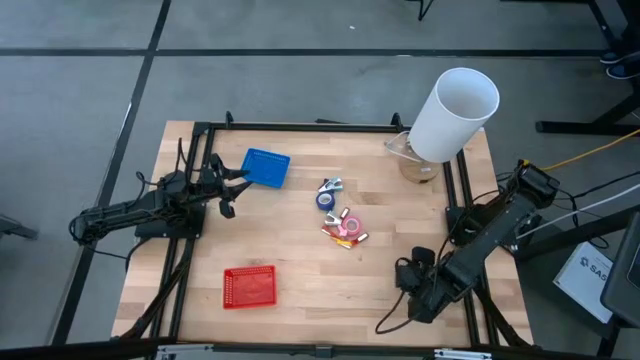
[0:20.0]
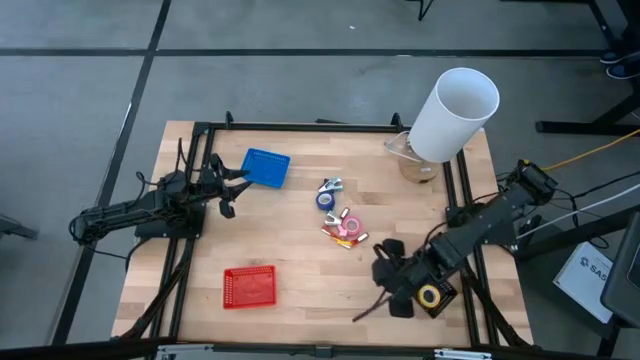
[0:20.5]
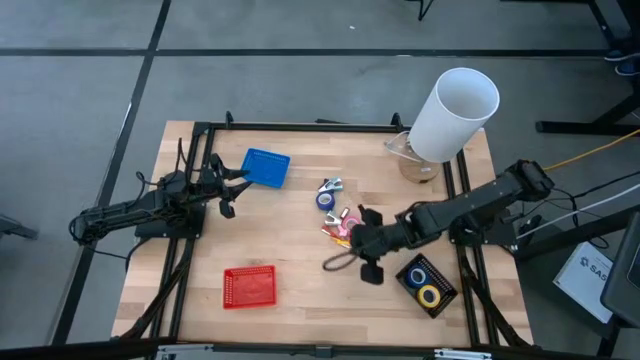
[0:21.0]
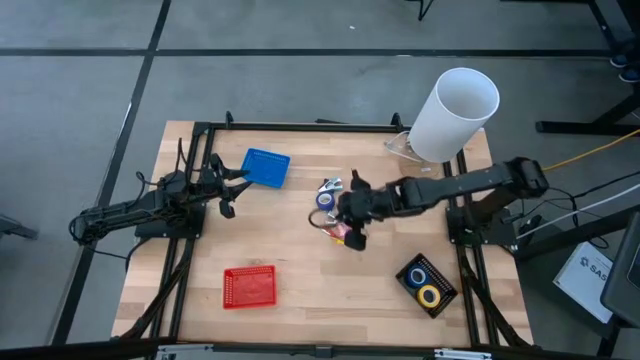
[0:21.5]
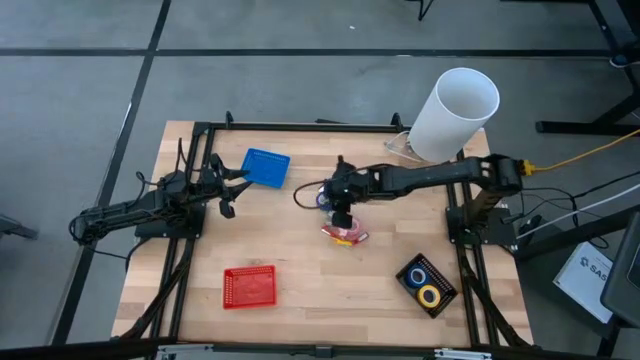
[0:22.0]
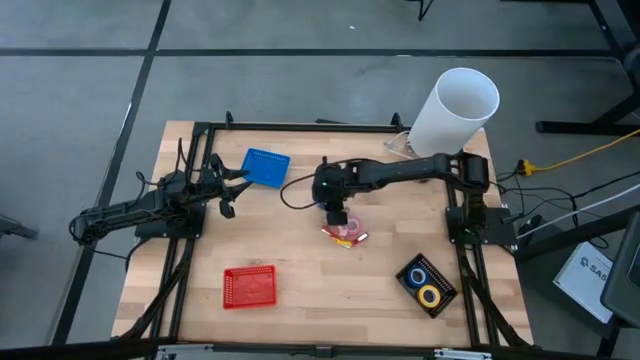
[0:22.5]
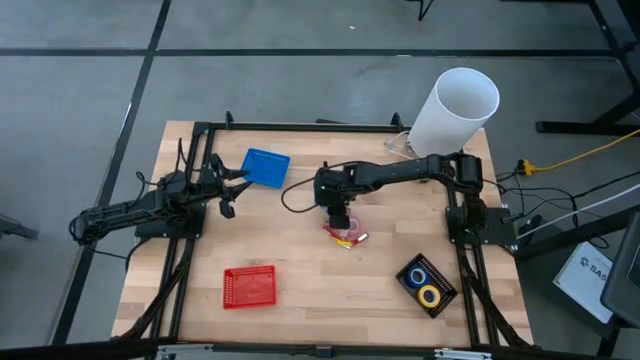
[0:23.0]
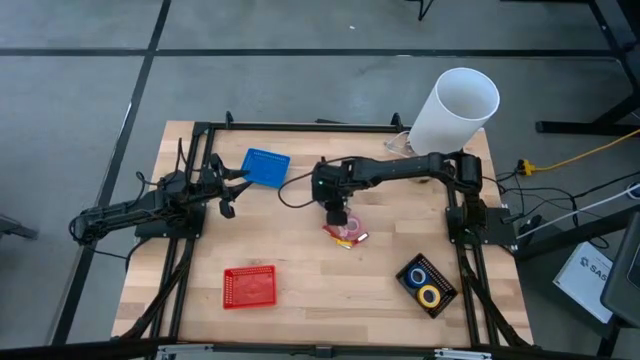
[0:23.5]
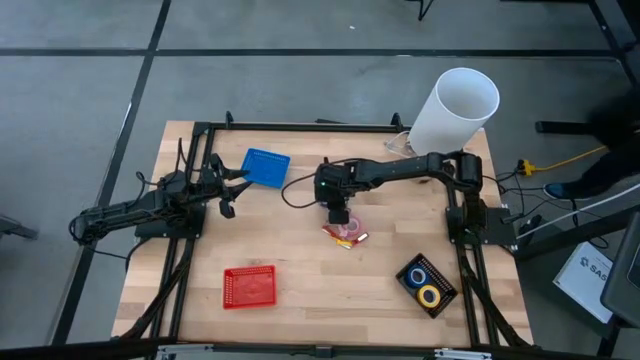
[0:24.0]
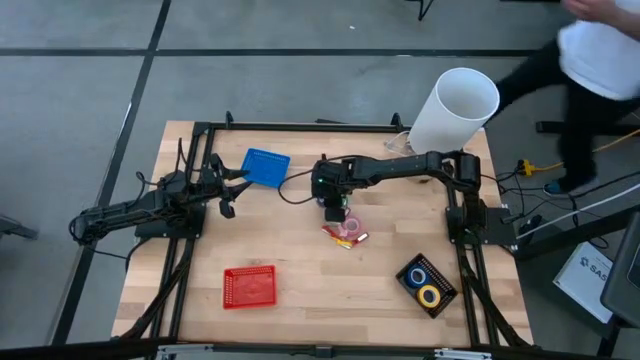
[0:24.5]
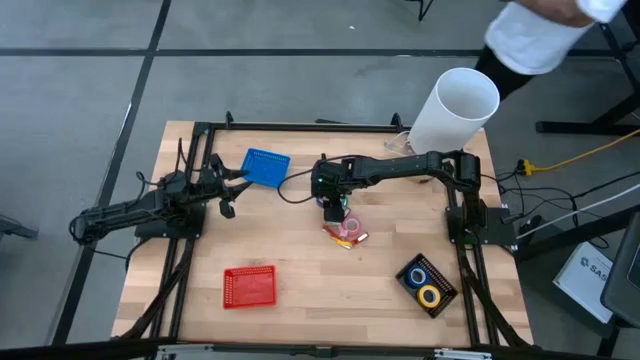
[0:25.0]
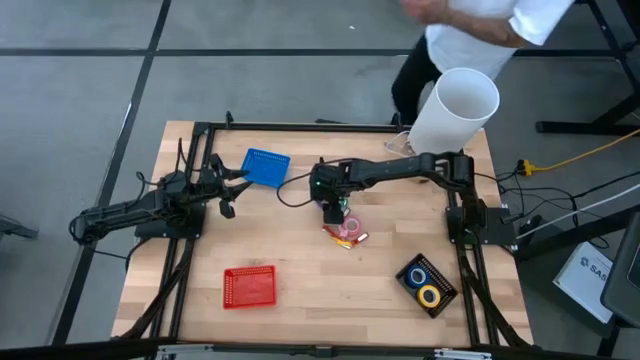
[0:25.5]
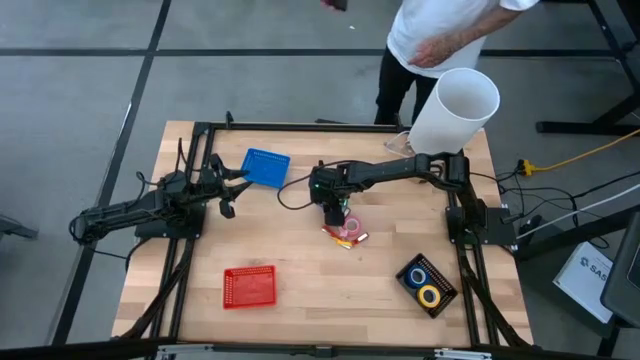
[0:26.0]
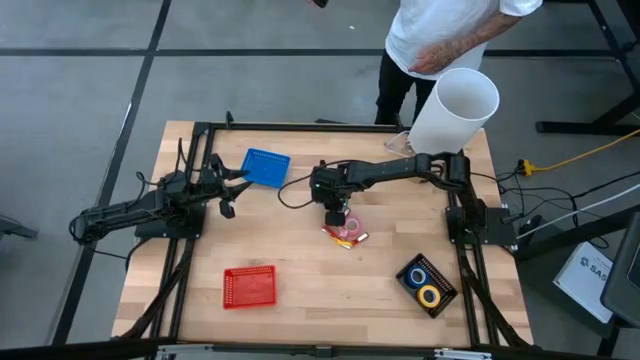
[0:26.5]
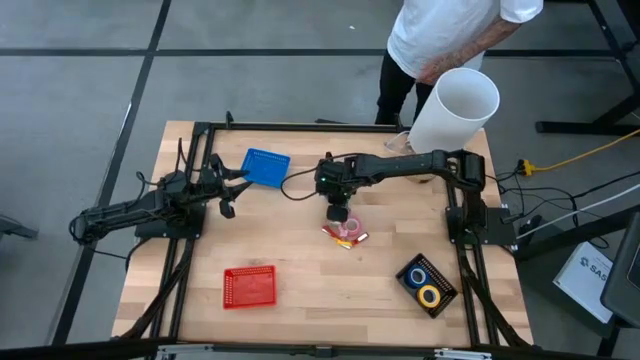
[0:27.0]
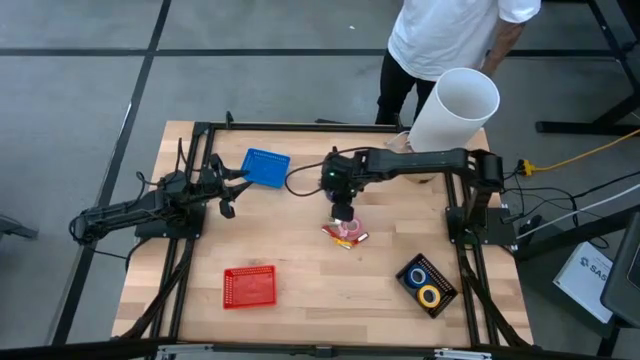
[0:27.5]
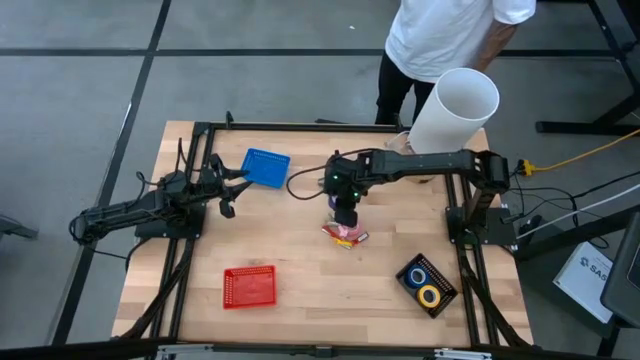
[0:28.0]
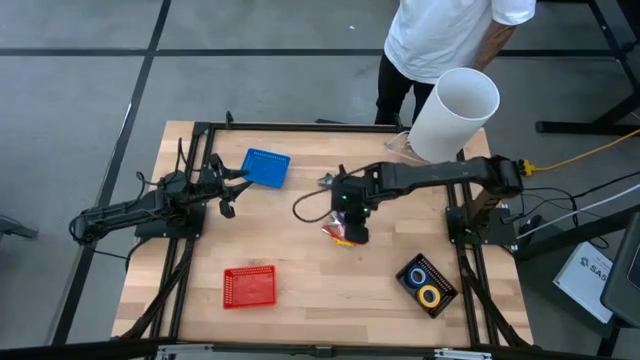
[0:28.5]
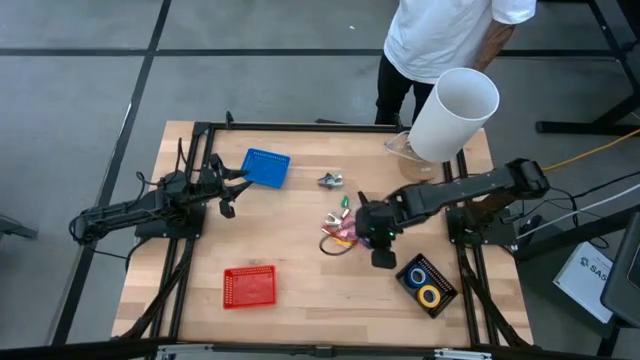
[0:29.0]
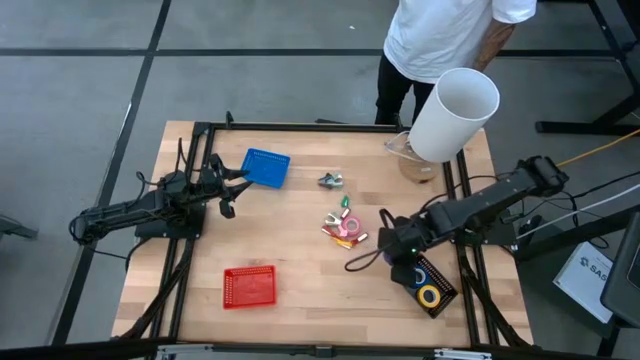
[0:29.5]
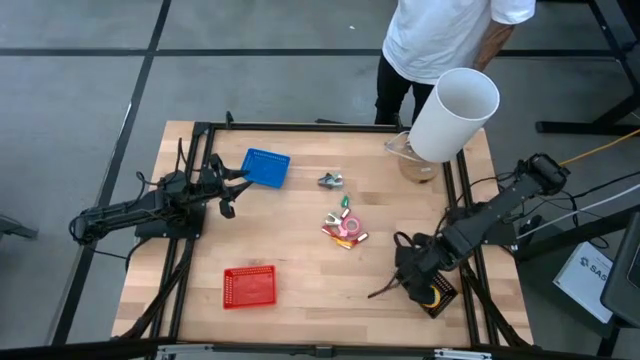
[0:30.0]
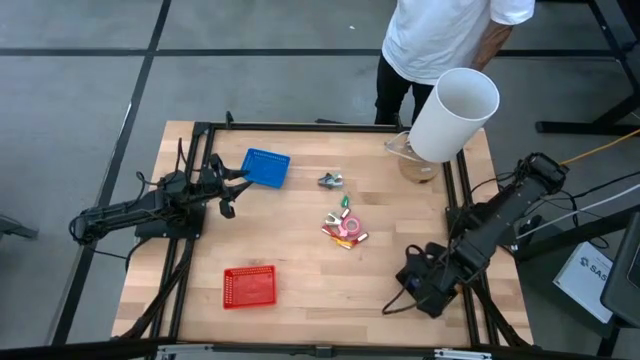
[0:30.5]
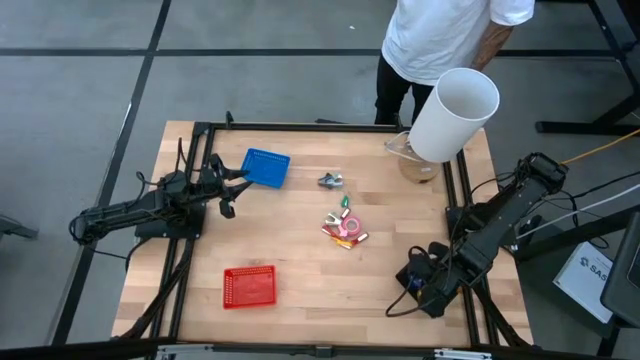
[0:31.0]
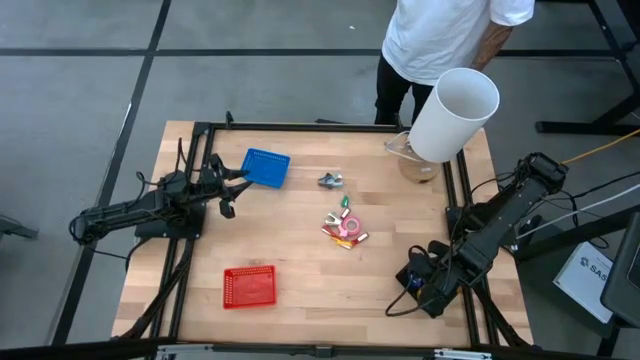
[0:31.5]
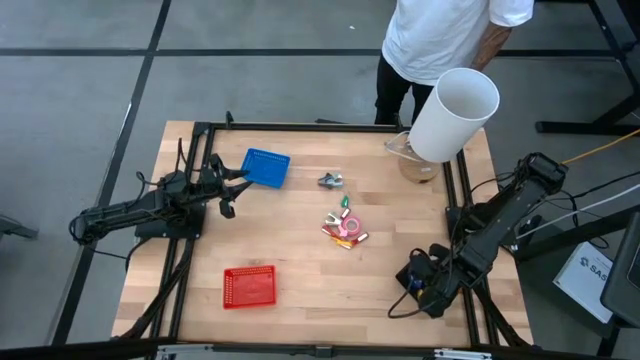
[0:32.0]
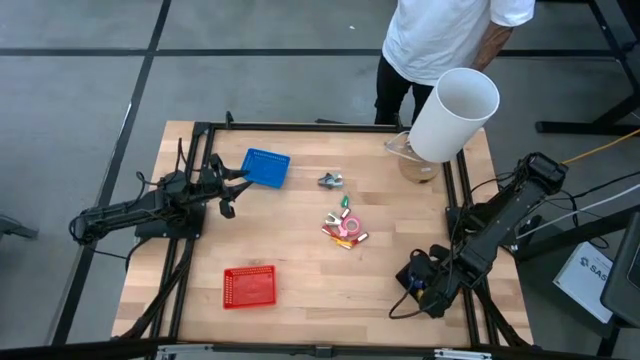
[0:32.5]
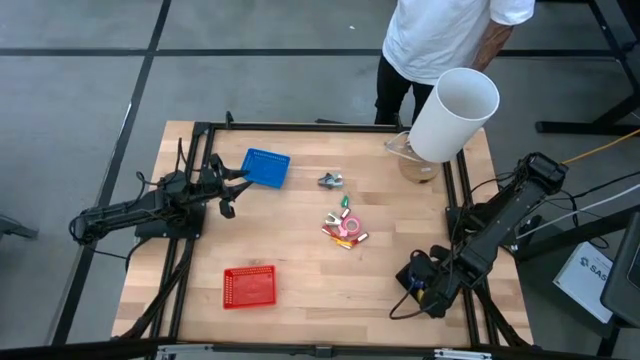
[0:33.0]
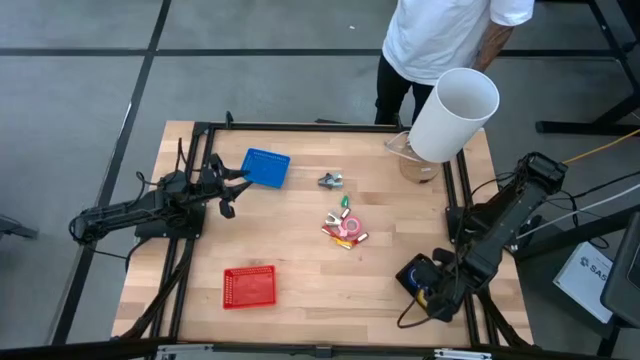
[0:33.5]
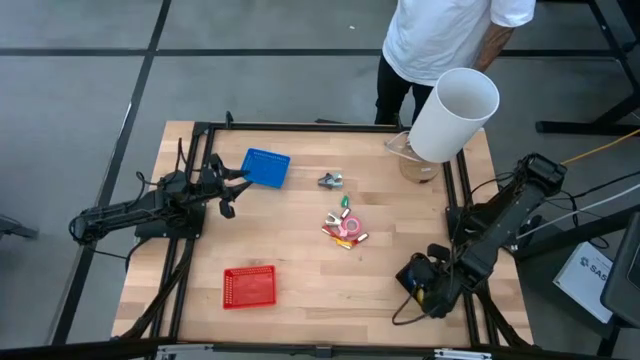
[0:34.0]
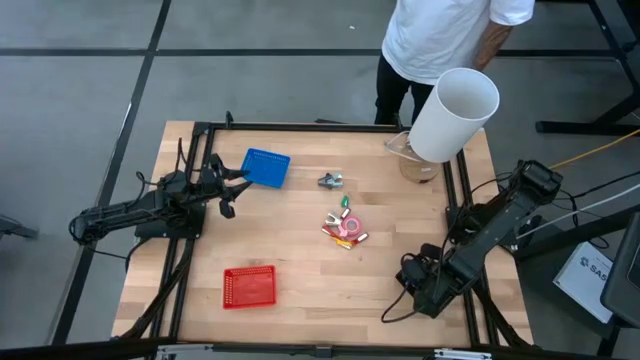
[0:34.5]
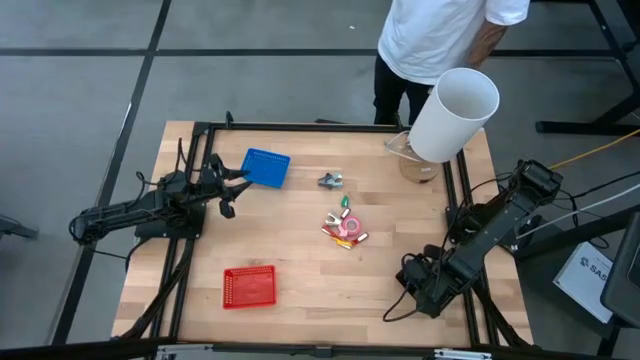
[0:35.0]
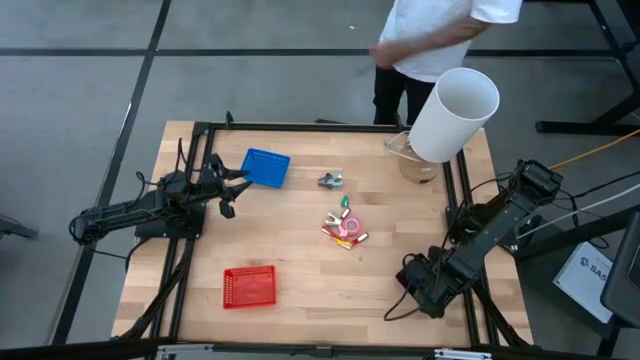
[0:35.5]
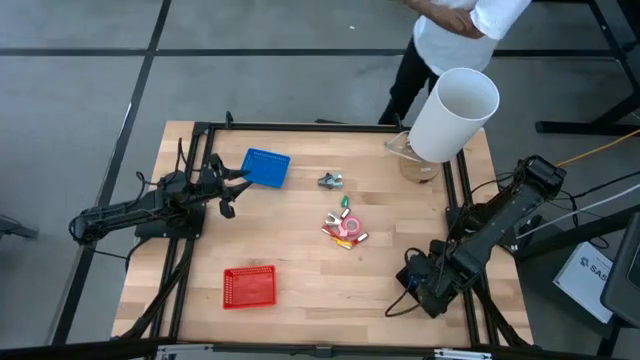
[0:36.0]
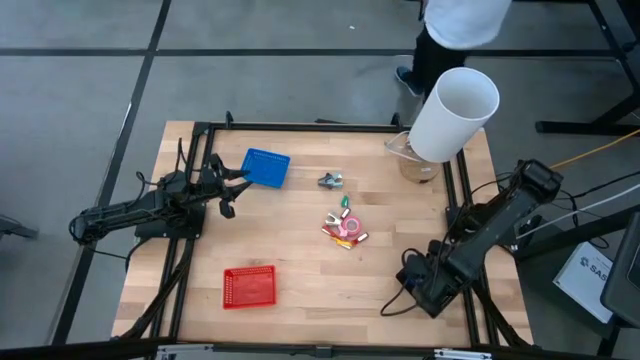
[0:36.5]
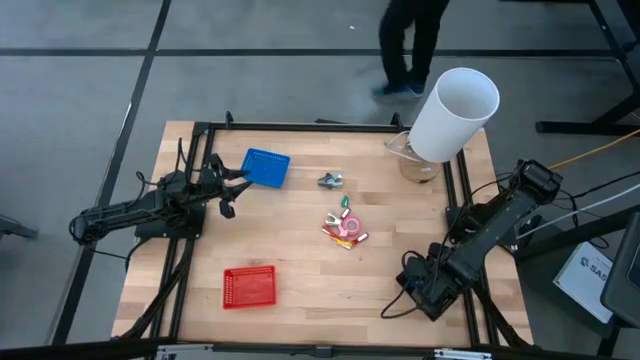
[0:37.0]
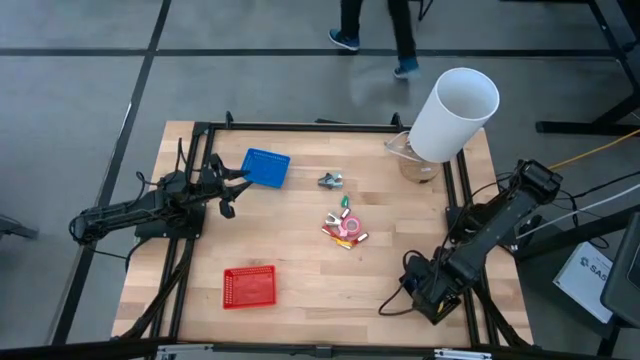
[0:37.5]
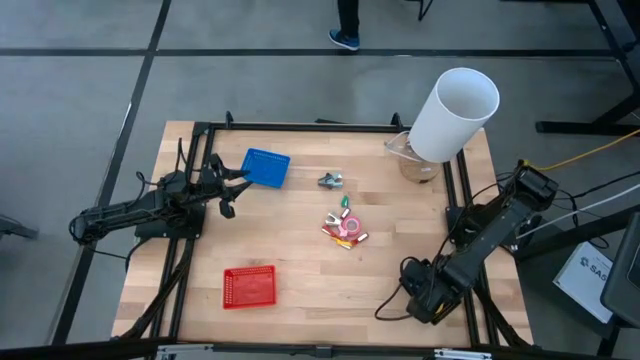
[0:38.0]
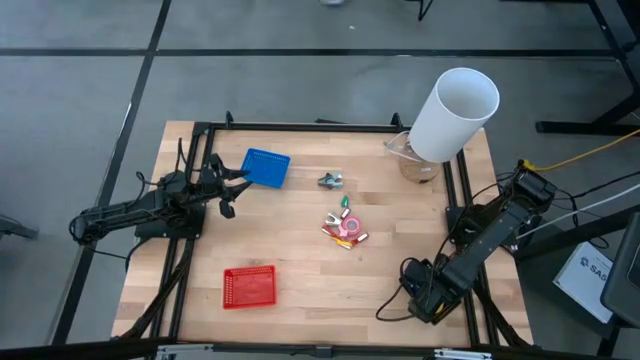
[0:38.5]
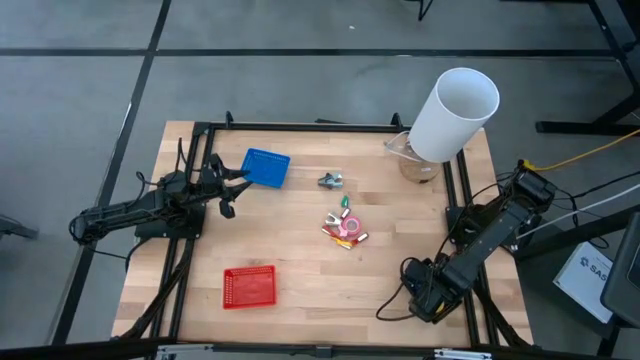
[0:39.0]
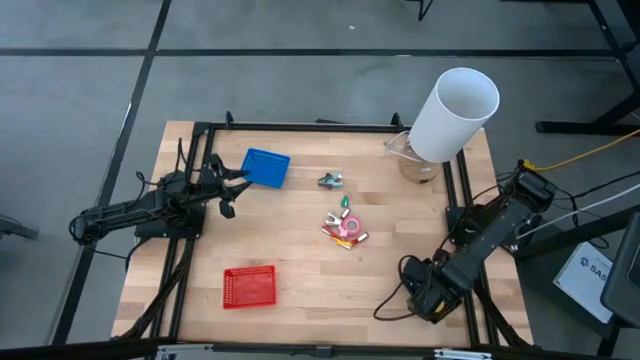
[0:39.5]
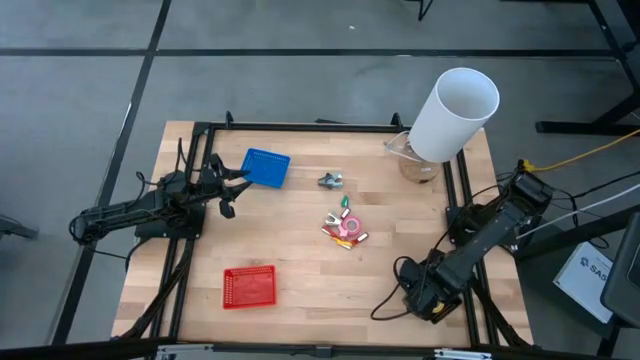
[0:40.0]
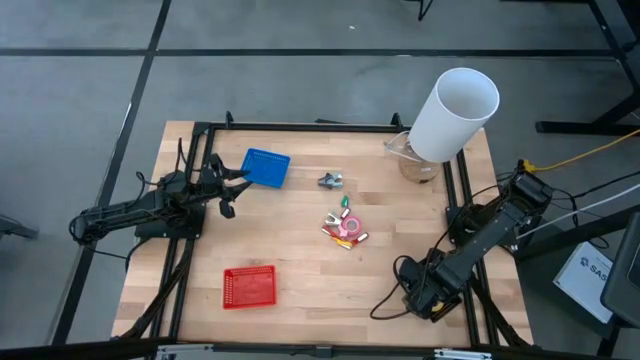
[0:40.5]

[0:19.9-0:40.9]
Task: Pick and place Stapler, Stapler remover, tape
Put the blue tape into the black bin

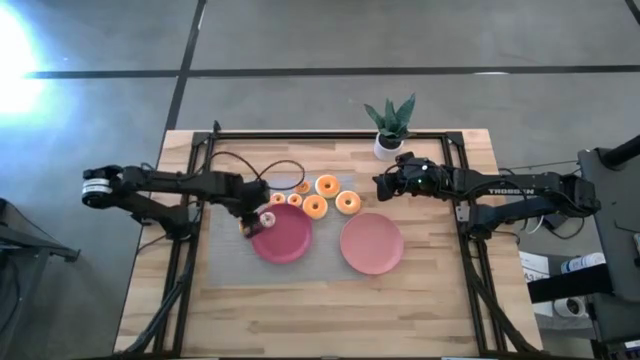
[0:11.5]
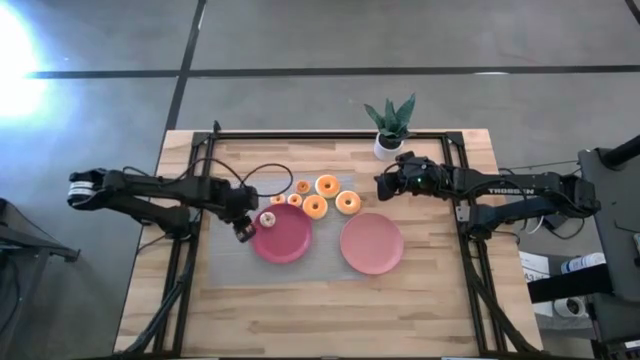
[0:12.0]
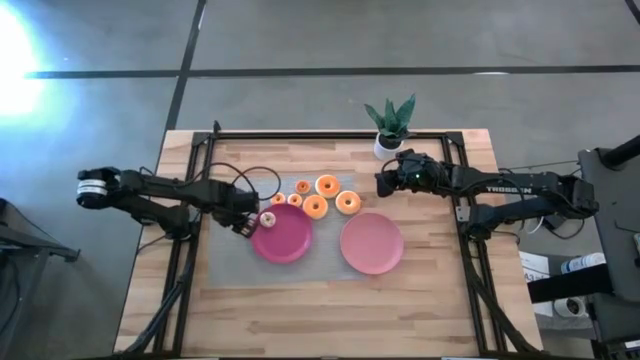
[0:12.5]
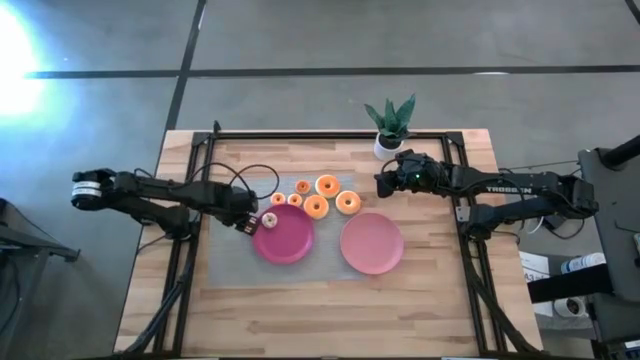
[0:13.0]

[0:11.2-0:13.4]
Task: Pick & Place donuts
Put the small blue donut on the dark pink plate
